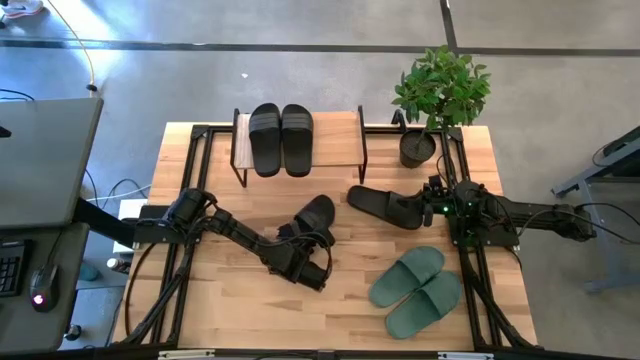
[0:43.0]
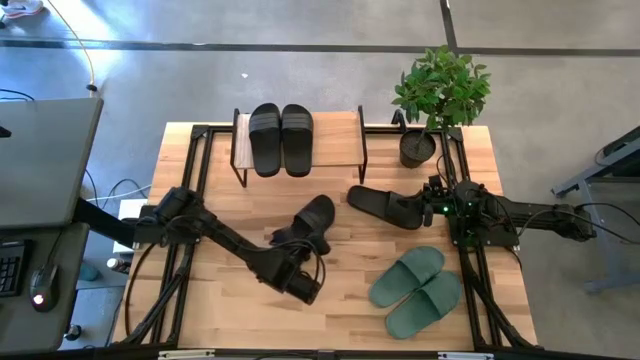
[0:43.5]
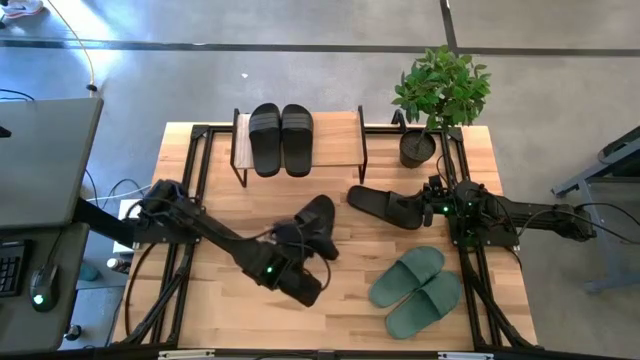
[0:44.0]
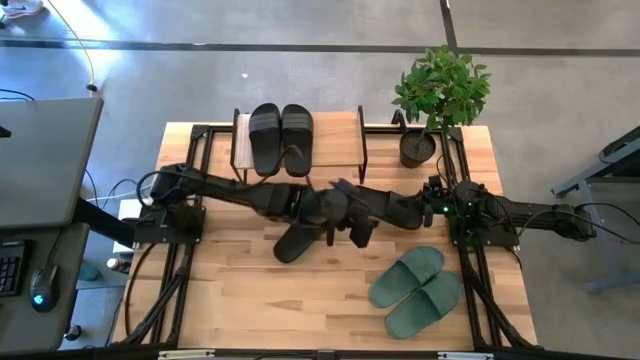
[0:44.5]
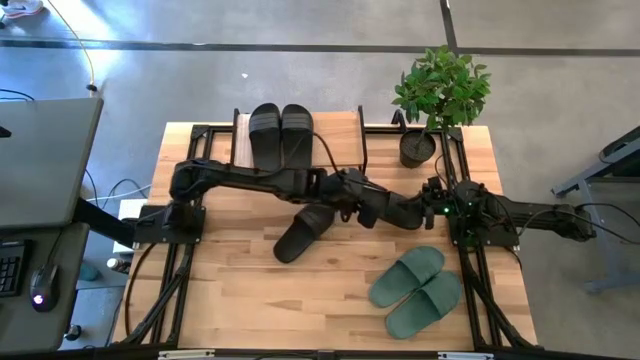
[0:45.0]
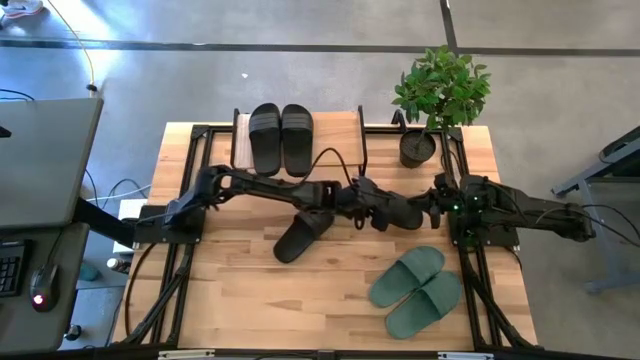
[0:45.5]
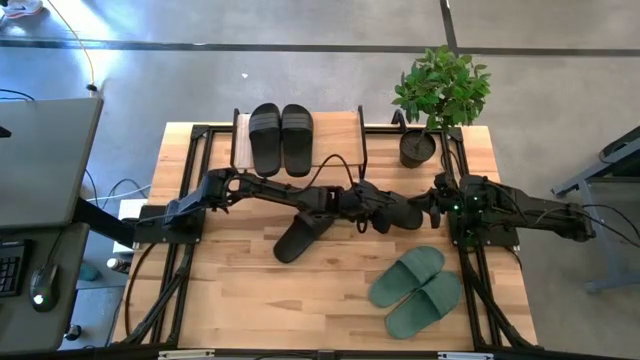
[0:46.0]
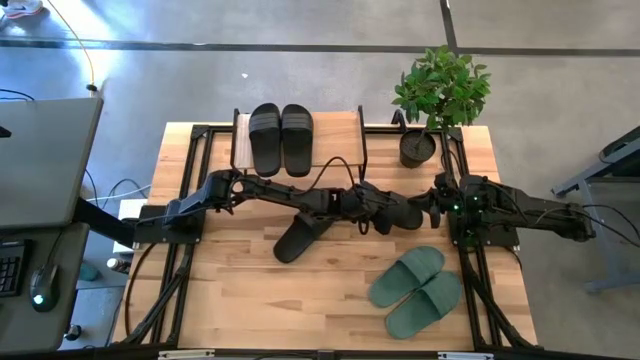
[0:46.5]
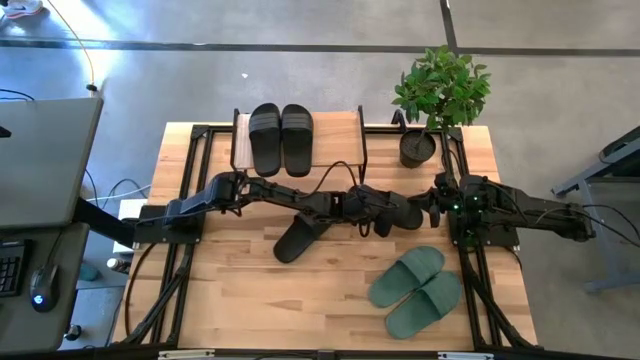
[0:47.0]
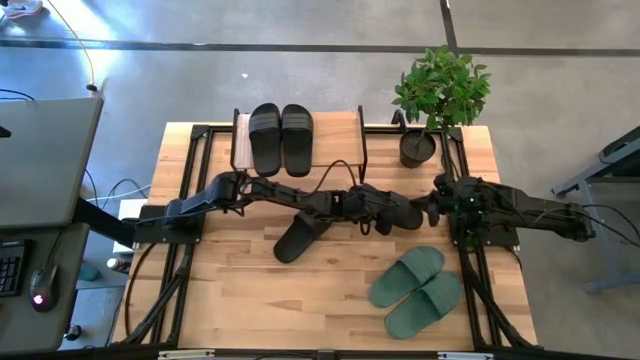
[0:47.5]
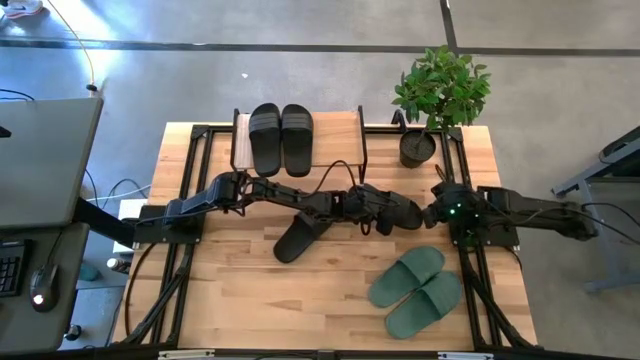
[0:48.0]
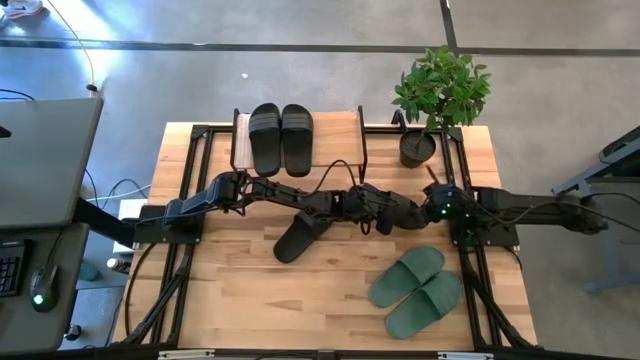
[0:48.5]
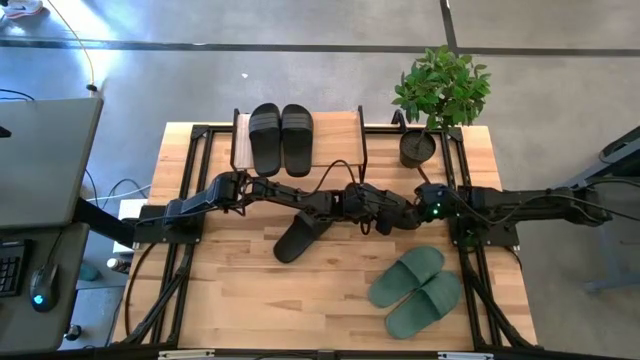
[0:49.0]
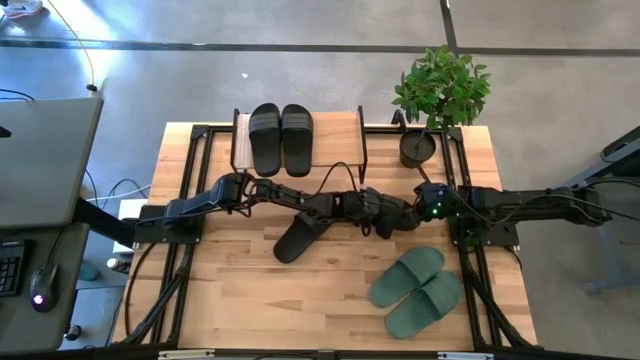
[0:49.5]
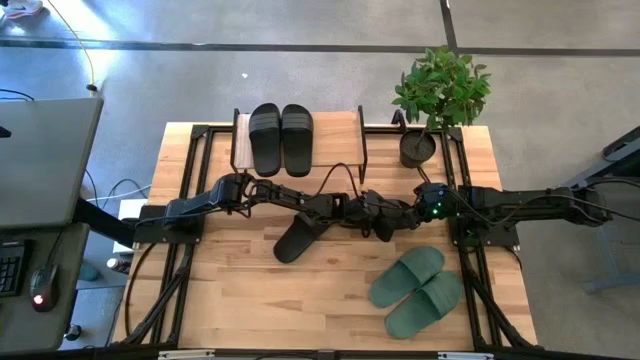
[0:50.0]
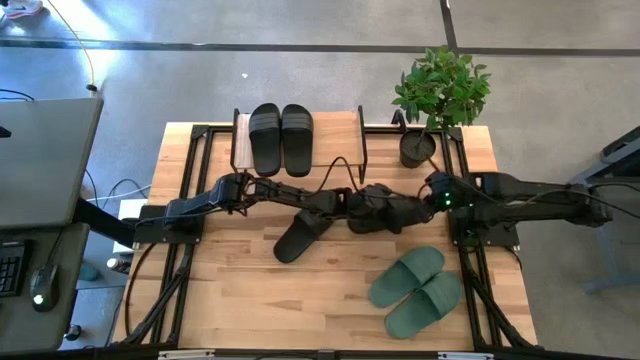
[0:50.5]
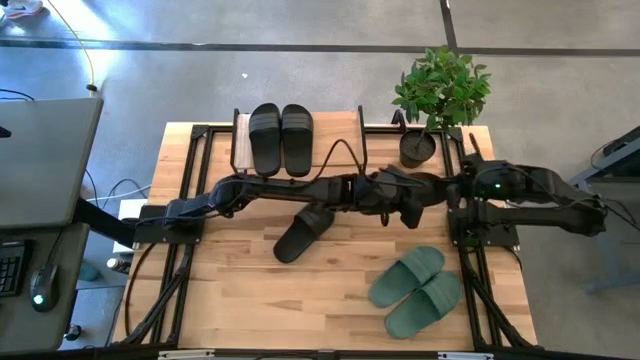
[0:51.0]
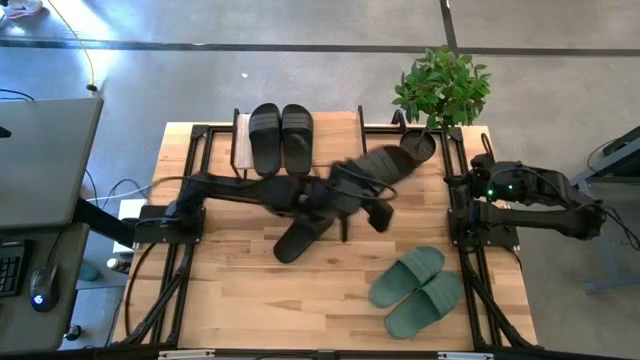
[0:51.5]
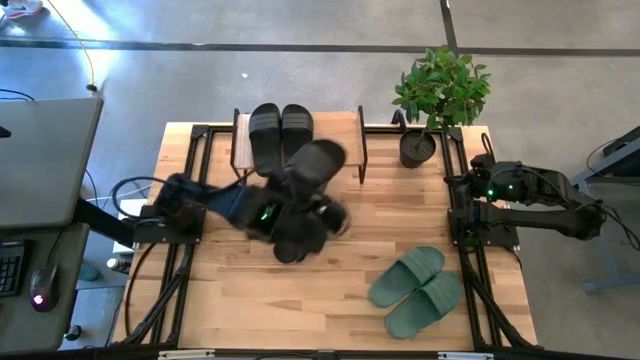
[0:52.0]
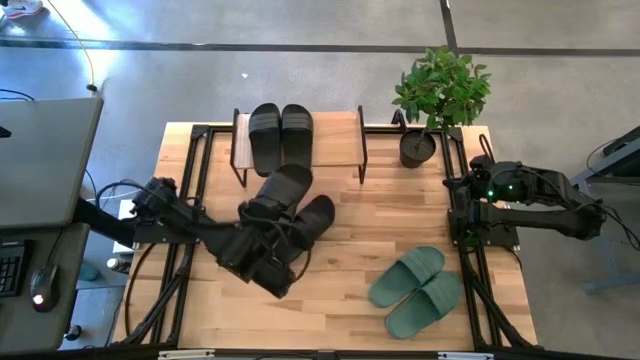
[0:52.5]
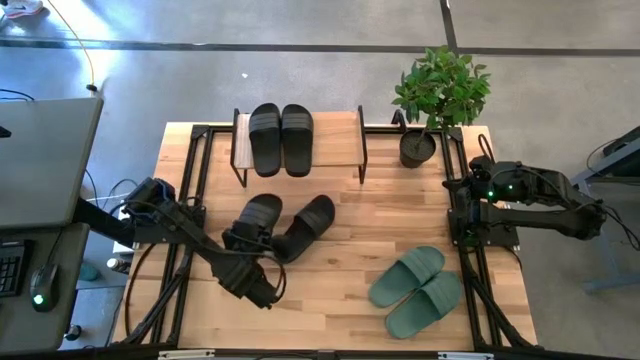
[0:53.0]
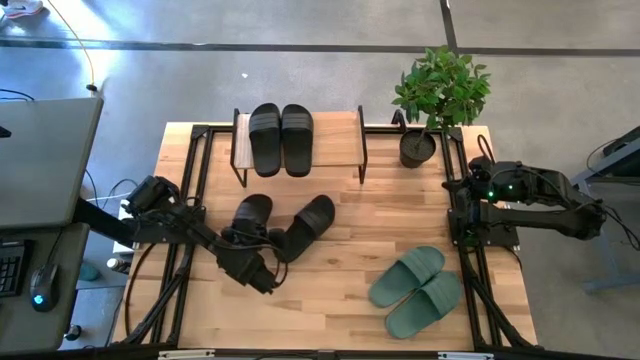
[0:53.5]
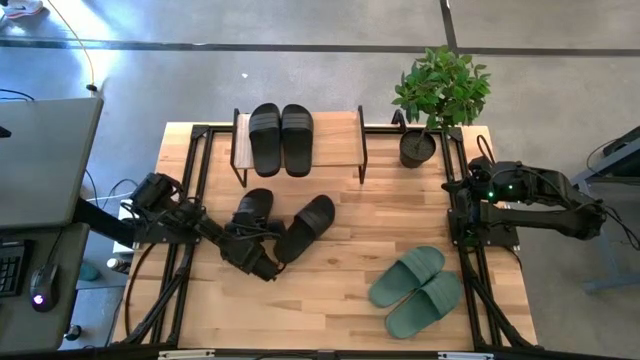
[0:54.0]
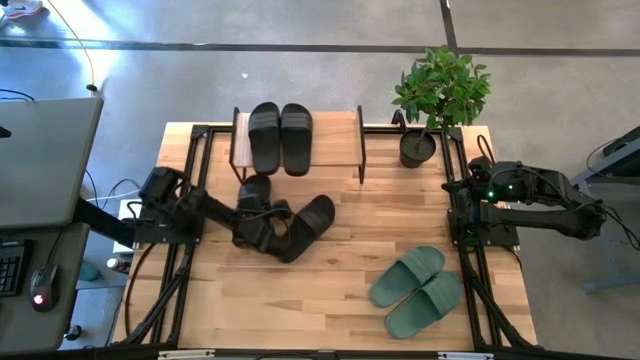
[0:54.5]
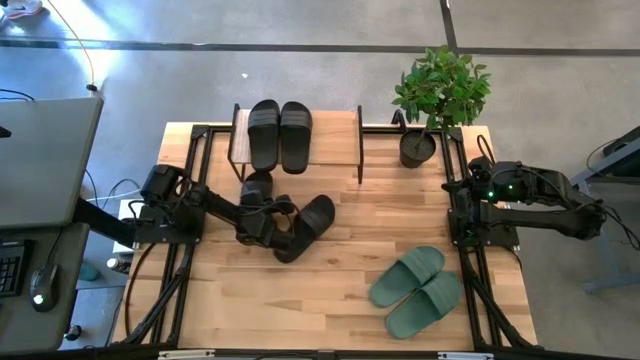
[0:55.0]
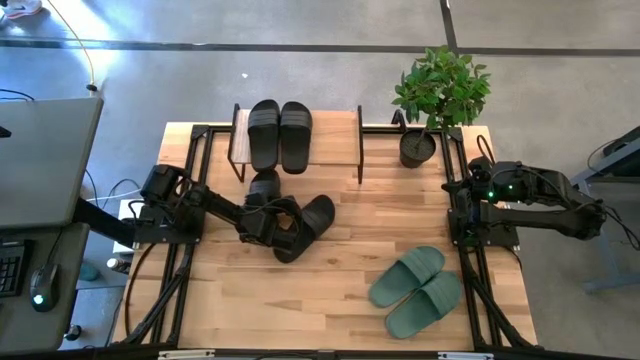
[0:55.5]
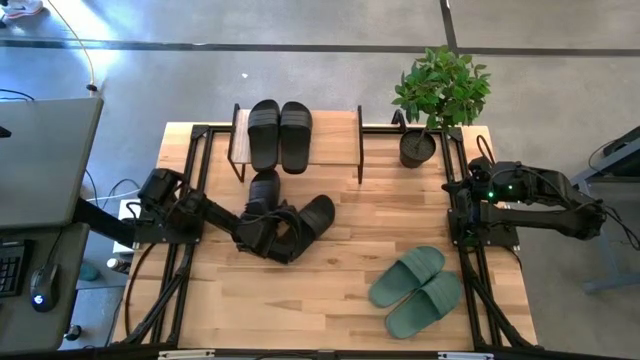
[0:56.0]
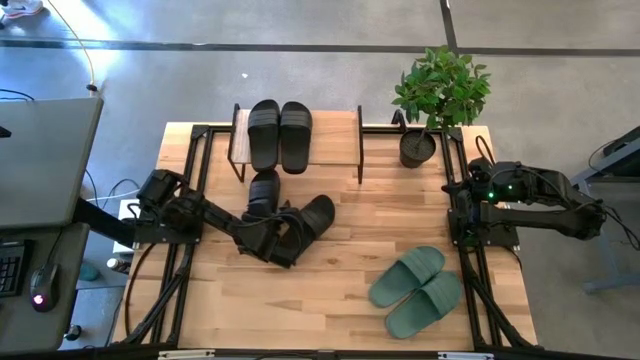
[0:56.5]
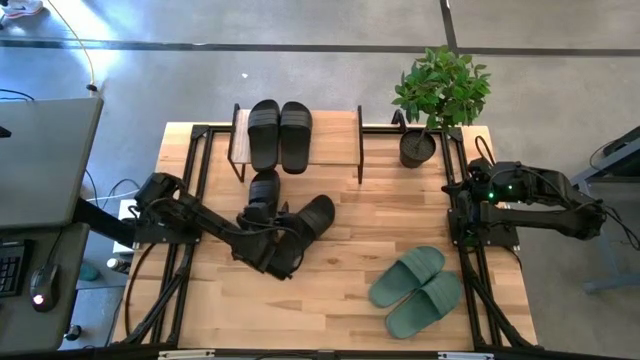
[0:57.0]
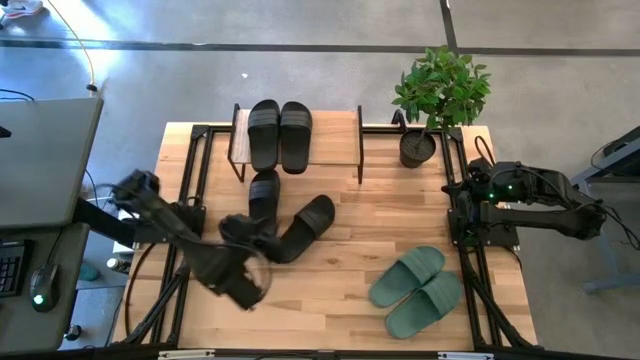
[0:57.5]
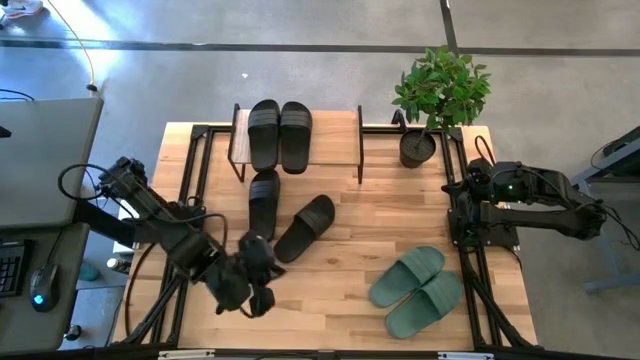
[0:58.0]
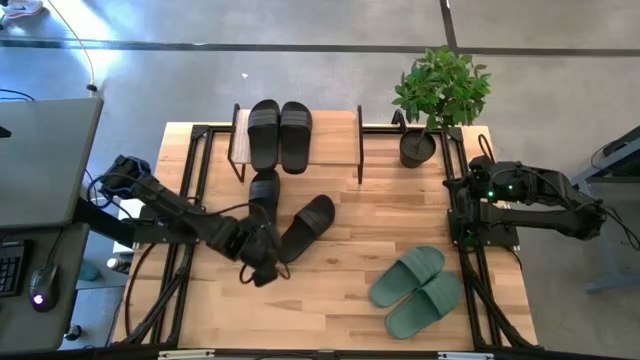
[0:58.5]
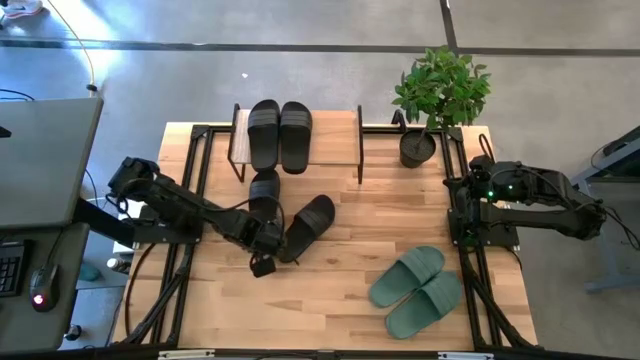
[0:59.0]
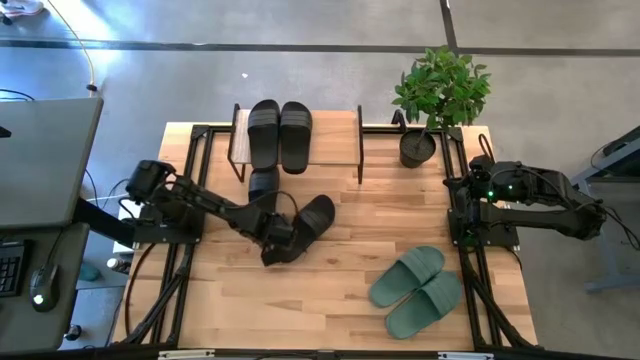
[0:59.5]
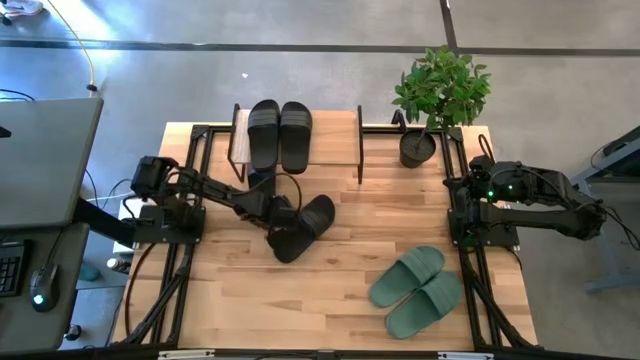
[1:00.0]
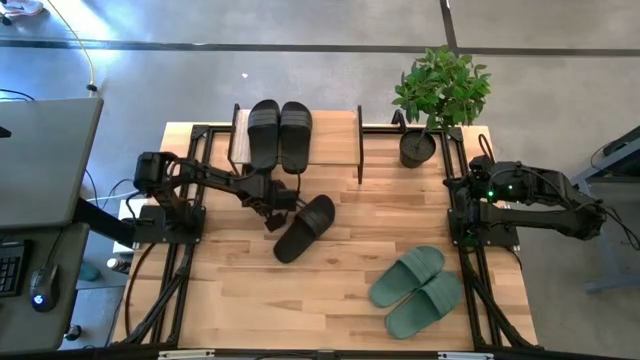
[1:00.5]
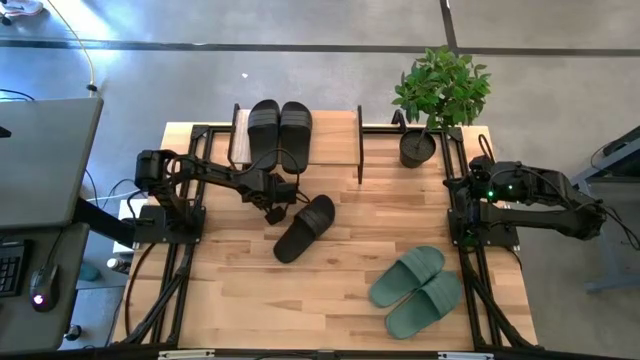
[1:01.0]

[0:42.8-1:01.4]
Task: Pick and place slides into the shelf
Put the right black slide under the shelf

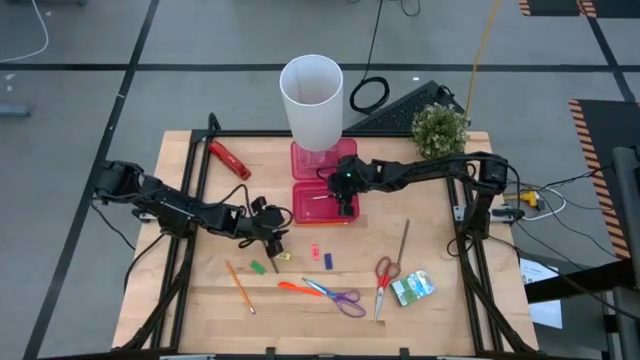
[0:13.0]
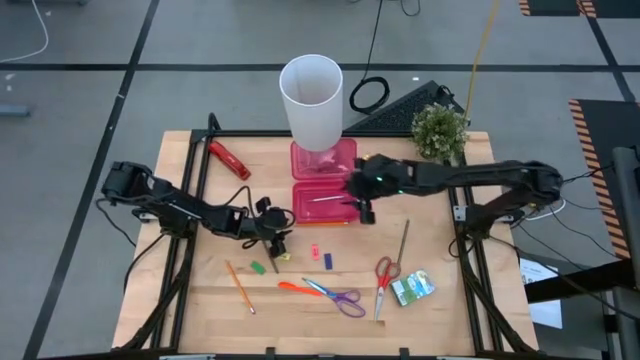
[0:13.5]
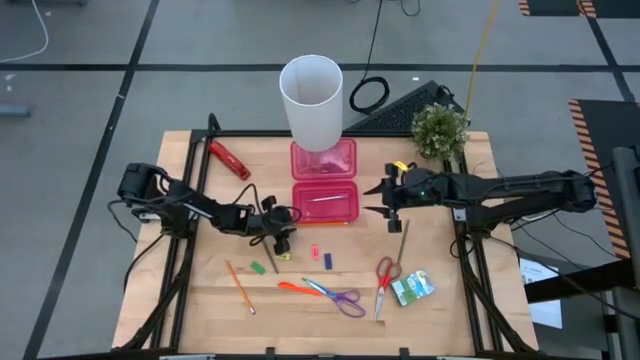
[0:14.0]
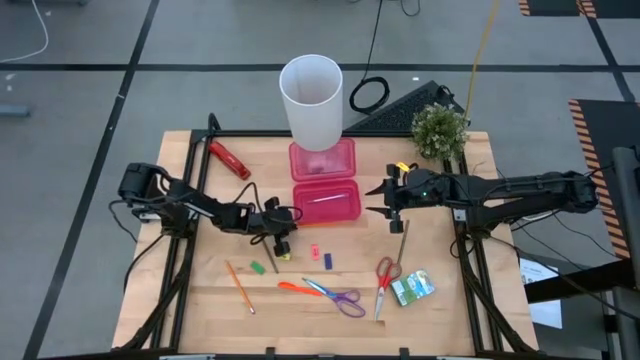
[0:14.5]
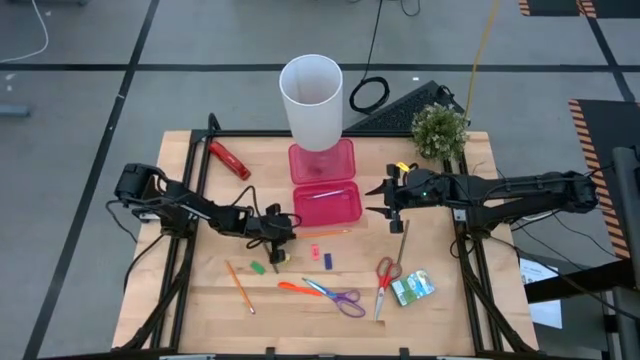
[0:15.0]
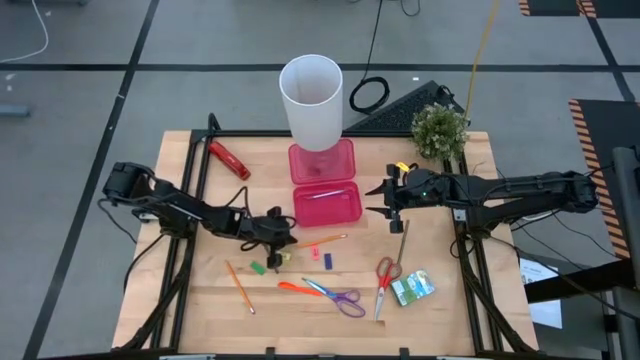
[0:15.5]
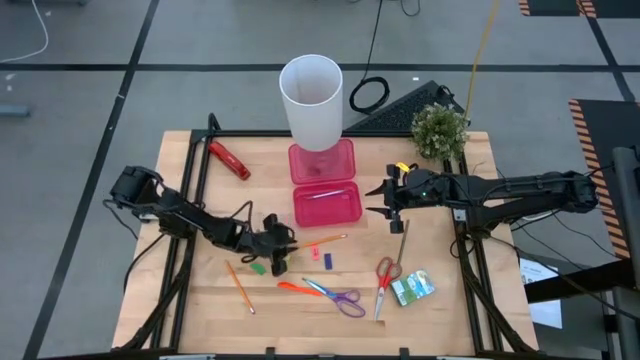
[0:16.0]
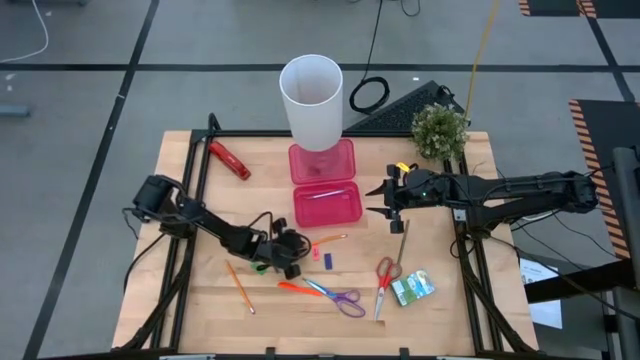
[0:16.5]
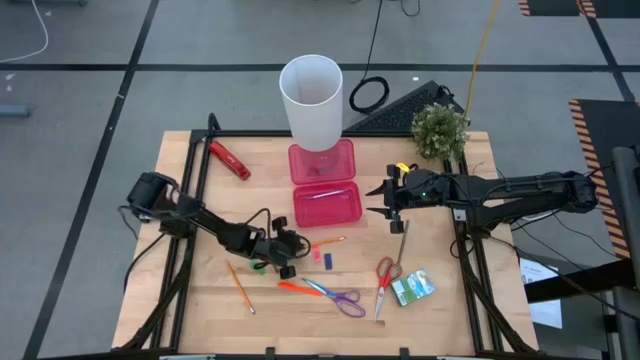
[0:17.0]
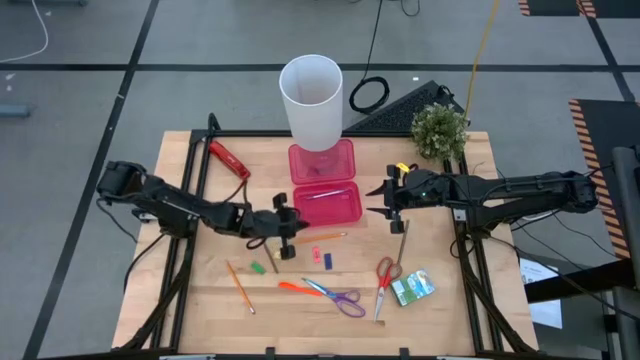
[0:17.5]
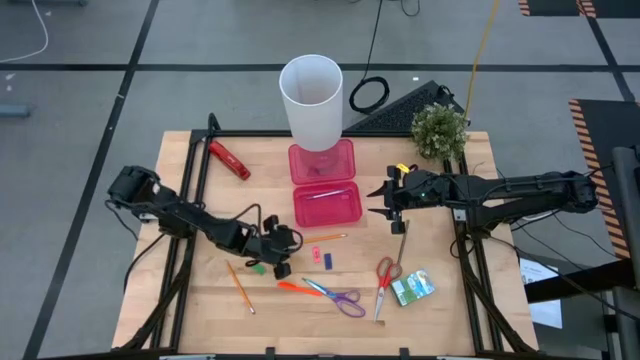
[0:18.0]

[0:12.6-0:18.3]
Task: Pack school essentials
Put the top yellow pencil into the pink supply box
